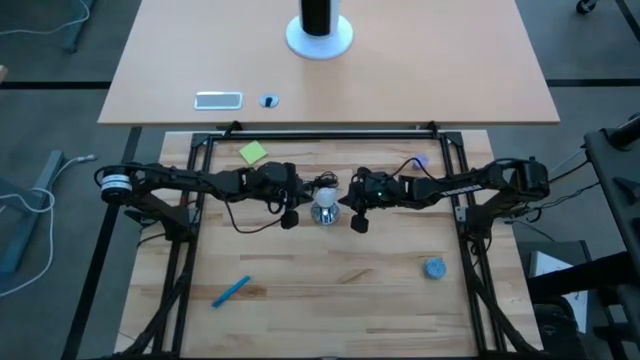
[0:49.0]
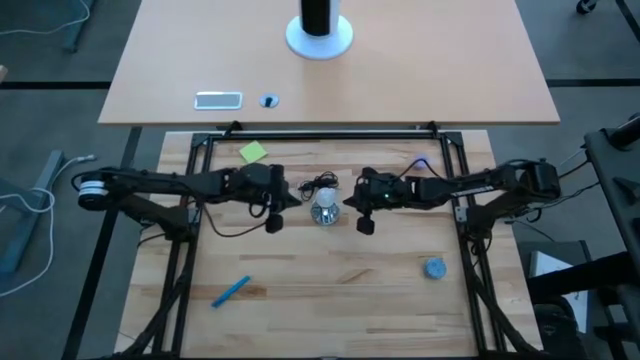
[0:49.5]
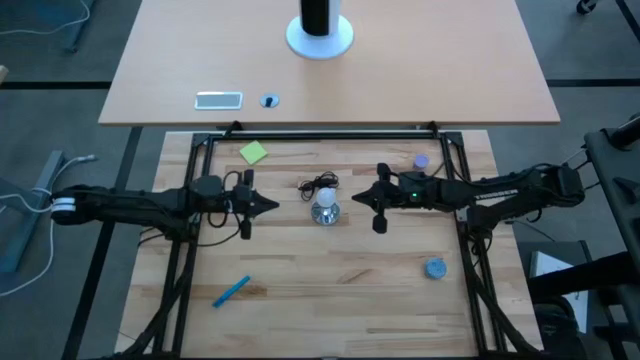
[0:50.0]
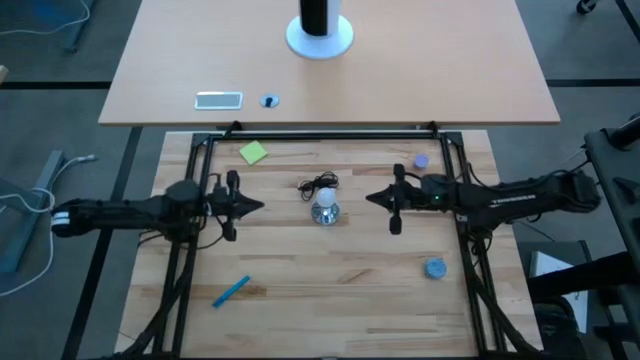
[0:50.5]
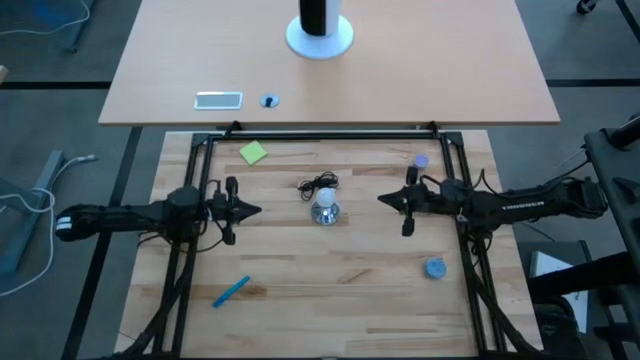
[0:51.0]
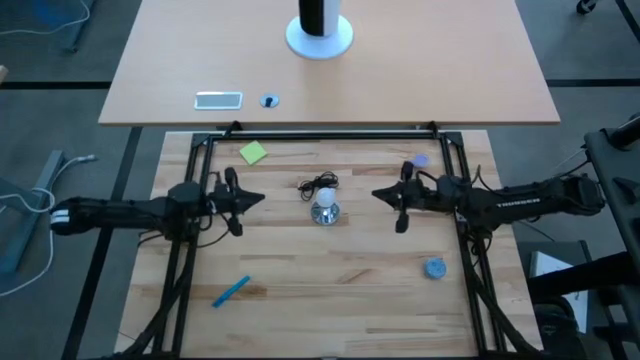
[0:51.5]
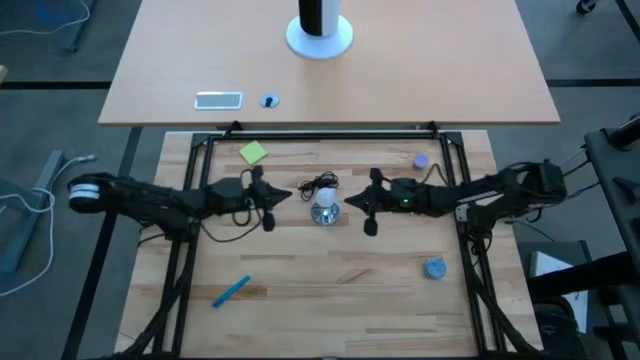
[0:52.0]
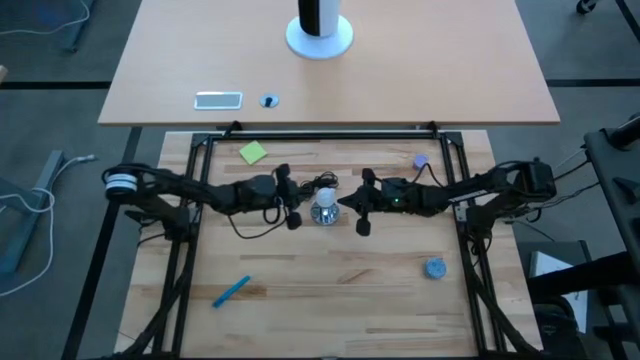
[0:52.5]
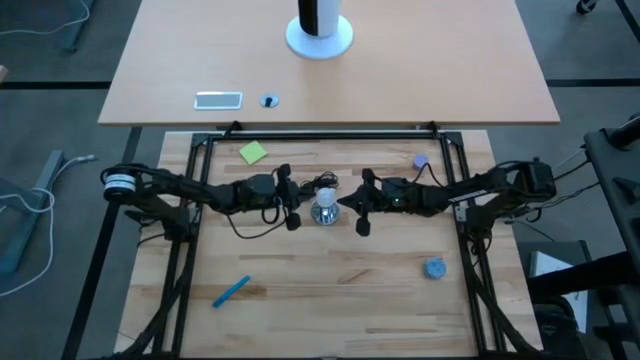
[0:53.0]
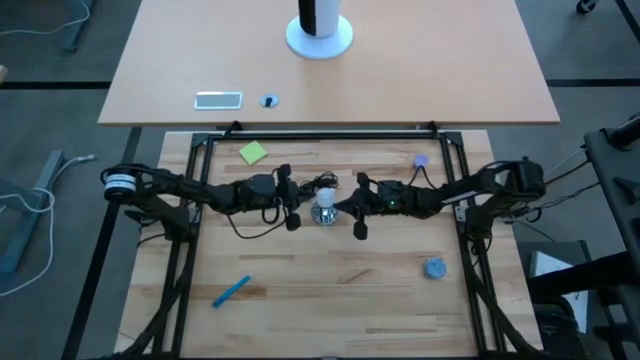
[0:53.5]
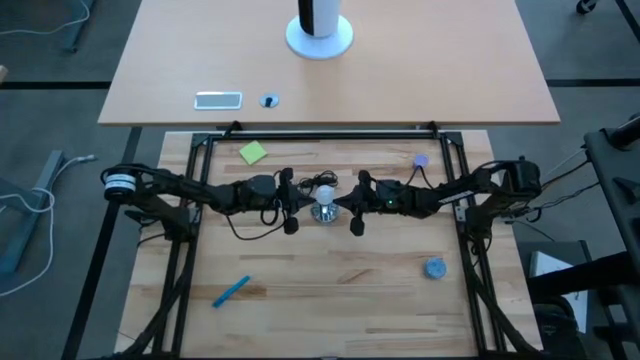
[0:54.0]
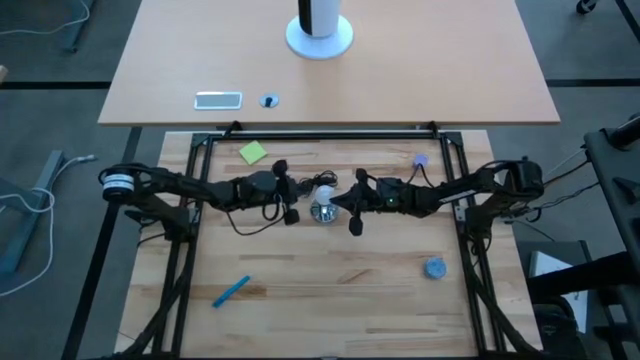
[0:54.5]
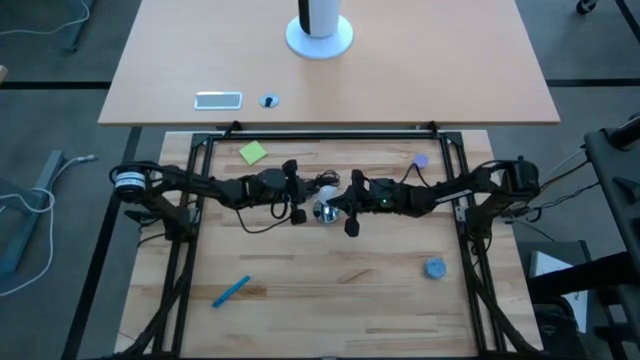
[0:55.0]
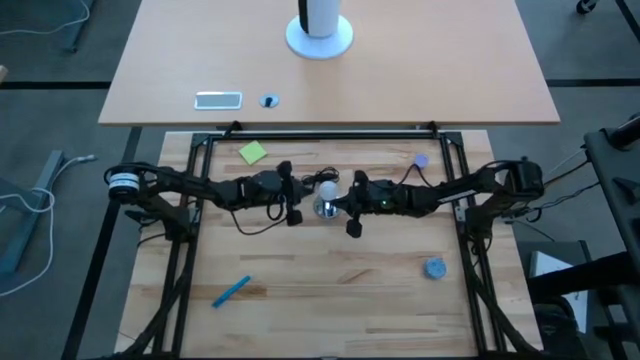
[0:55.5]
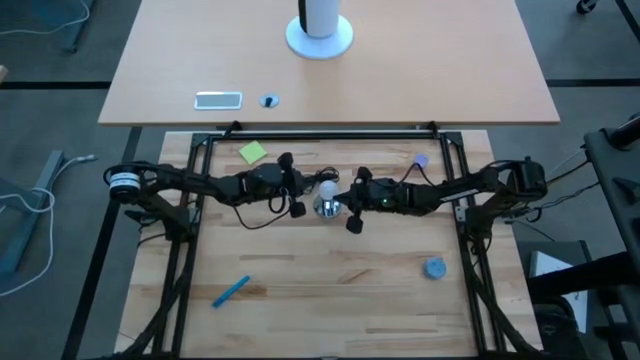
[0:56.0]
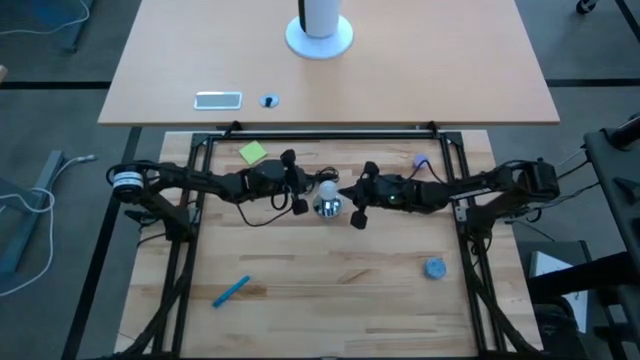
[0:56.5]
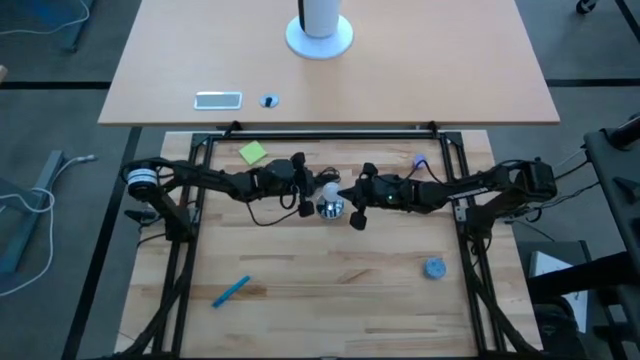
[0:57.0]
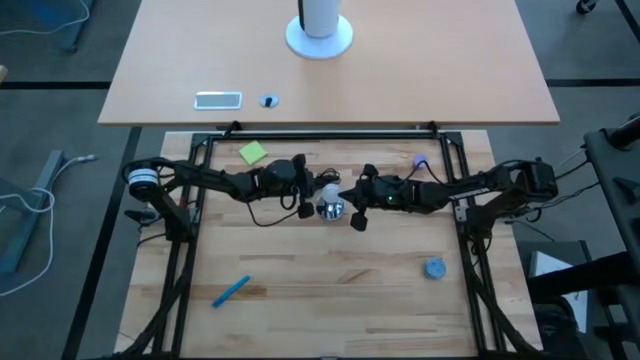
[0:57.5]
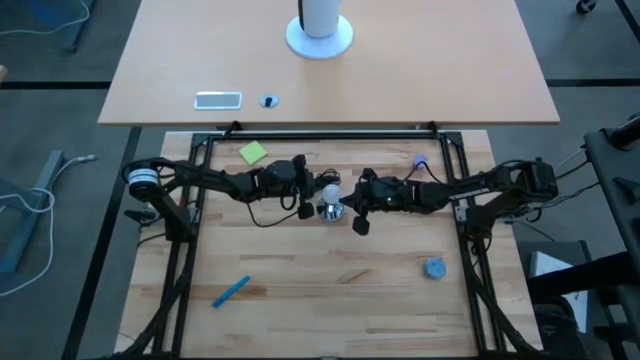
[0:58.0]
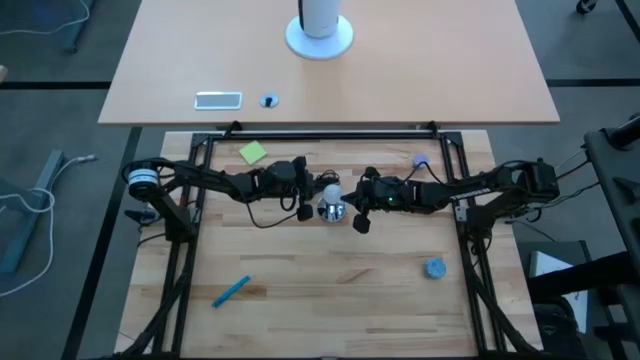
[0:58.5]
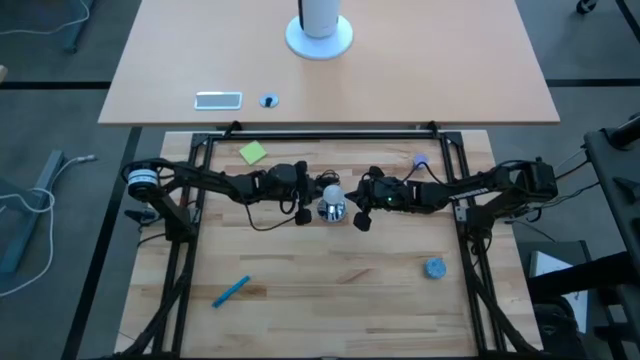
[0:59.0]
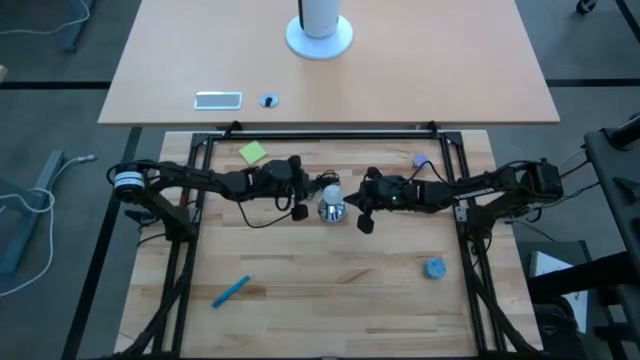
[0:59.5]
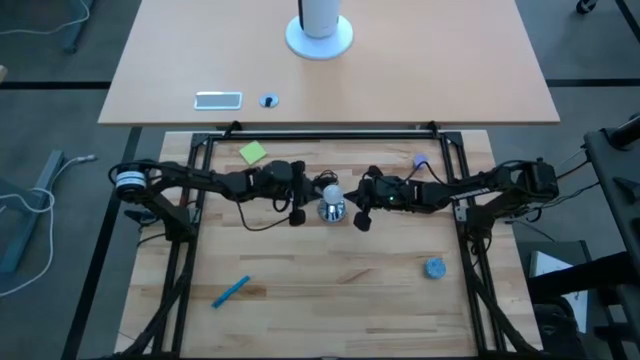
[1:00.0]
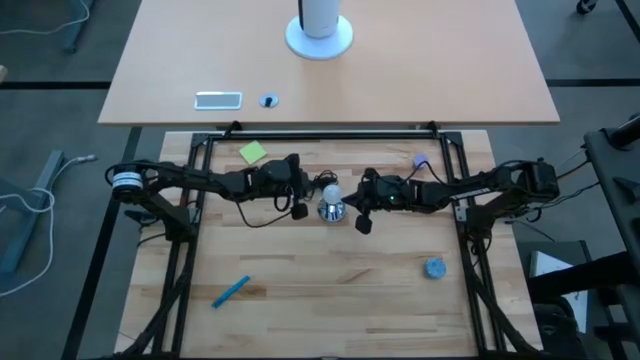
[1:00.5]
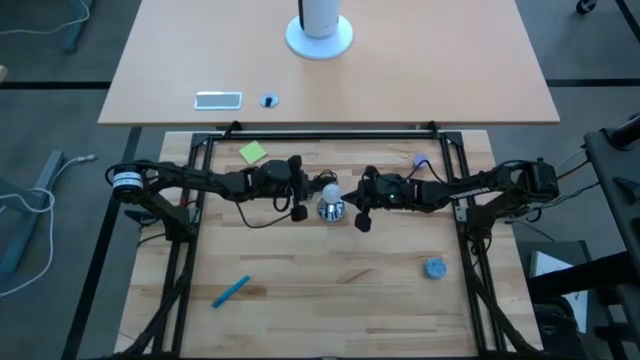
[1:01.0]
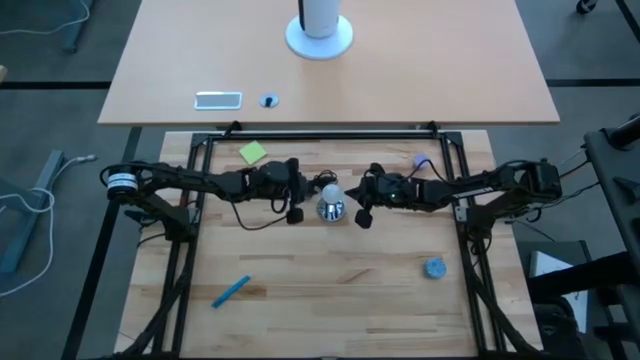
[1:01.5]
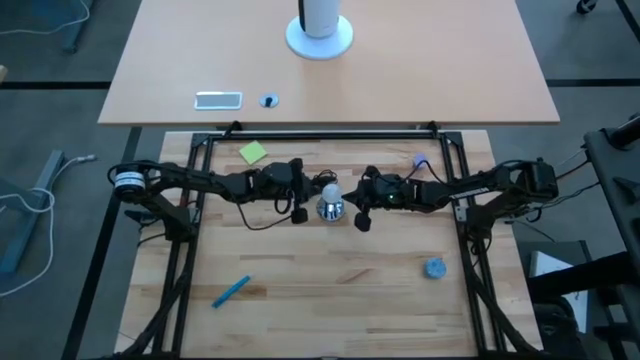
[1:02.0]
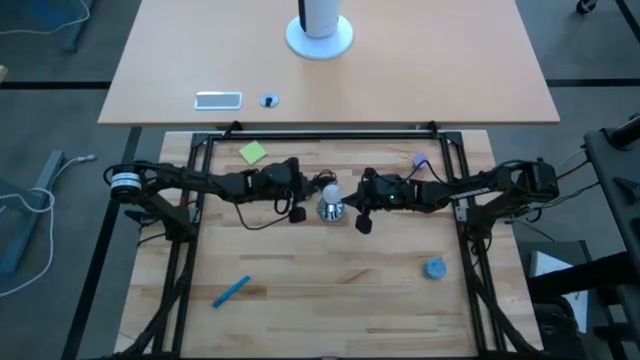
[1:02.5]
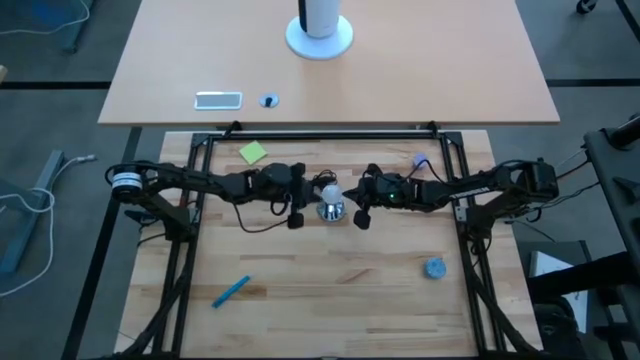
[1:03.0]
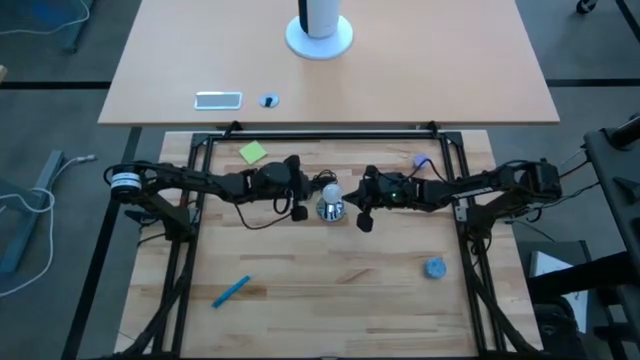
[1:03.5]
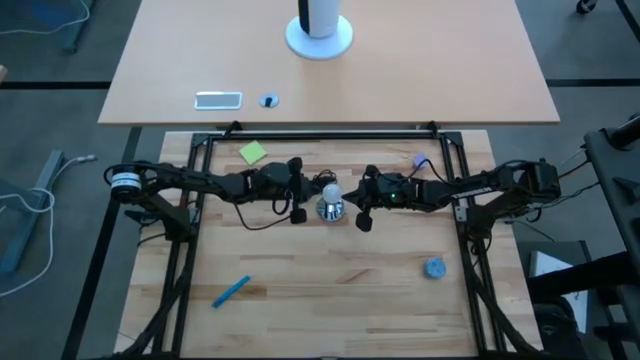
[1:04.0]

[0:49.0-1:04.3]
Task: Screw lightbulb
Remove the lightbulb from the lamp

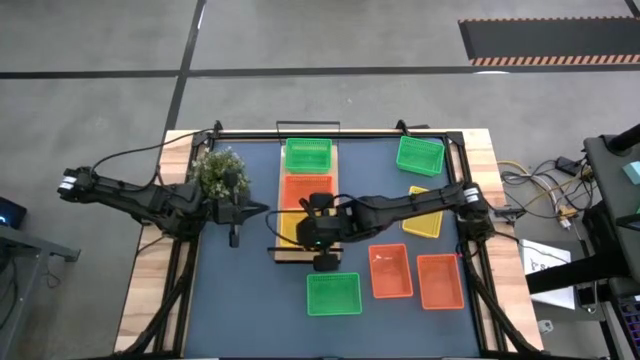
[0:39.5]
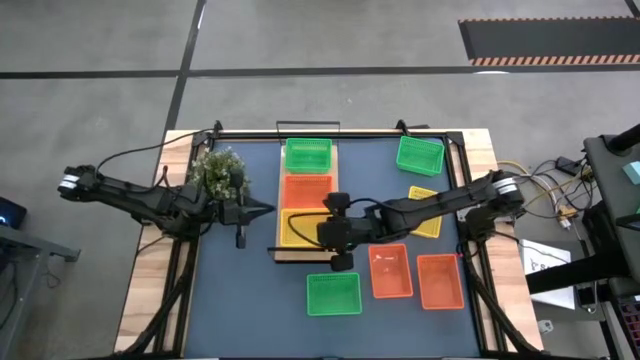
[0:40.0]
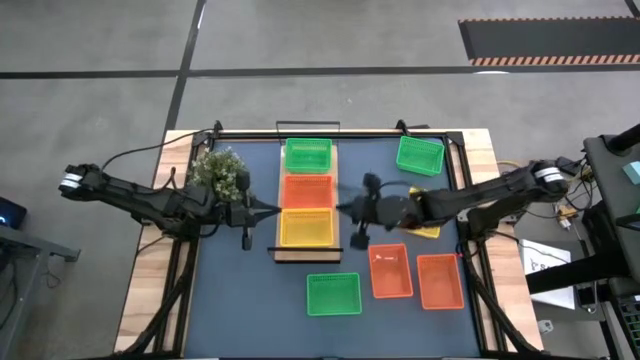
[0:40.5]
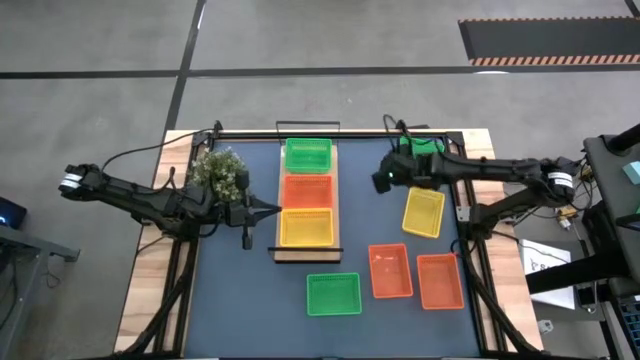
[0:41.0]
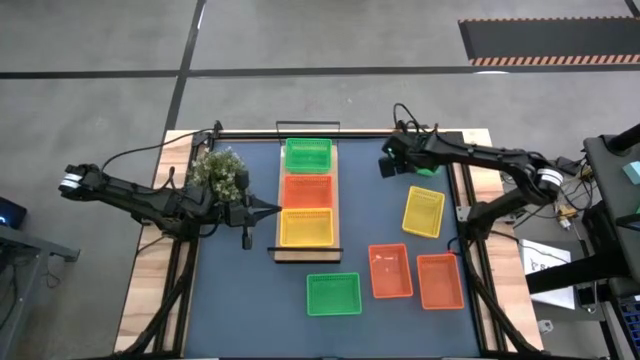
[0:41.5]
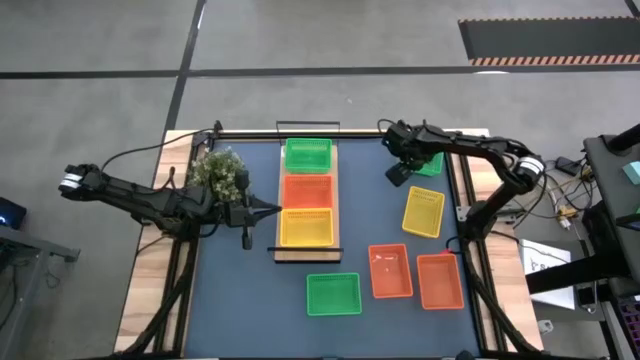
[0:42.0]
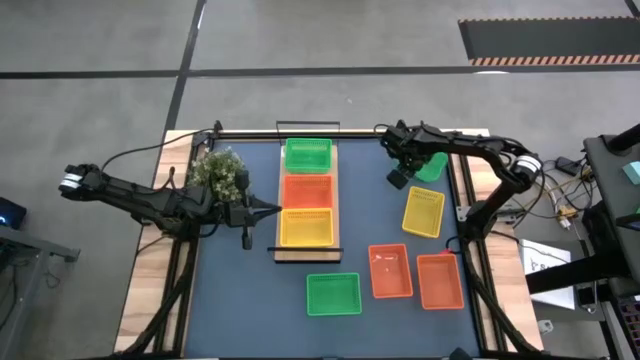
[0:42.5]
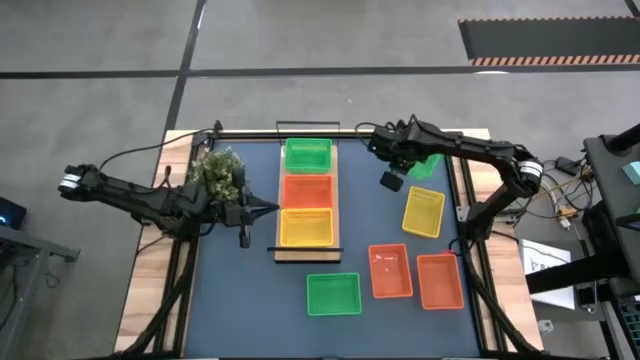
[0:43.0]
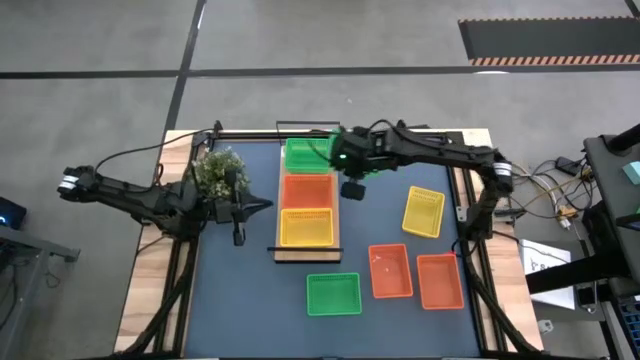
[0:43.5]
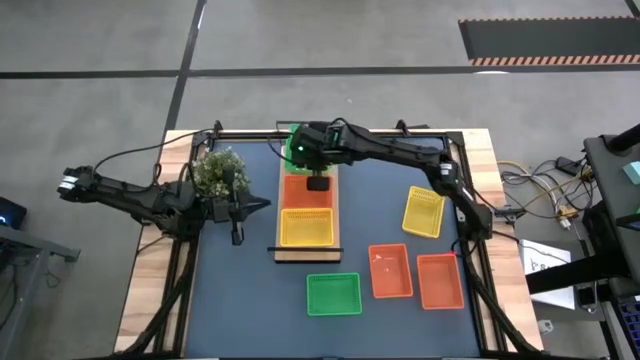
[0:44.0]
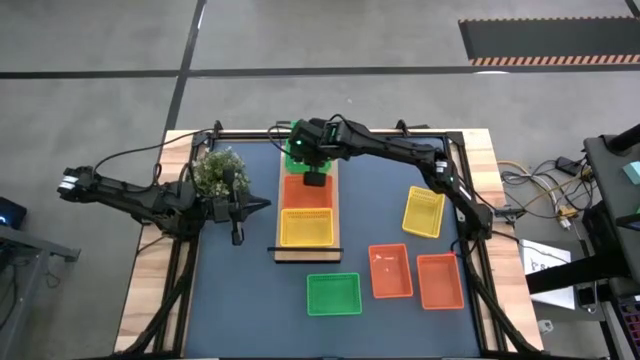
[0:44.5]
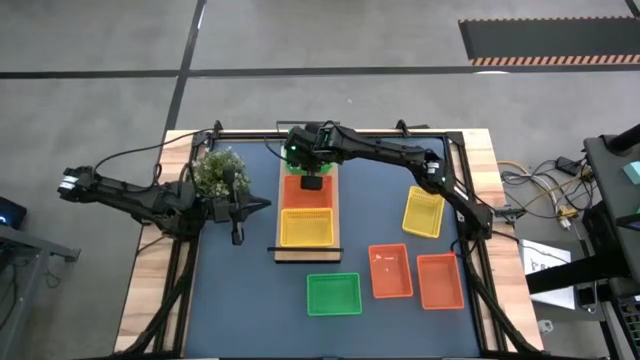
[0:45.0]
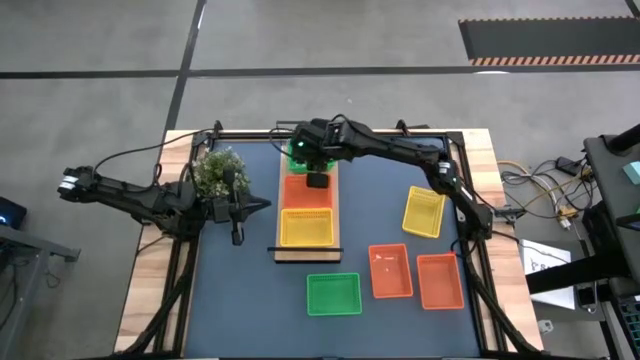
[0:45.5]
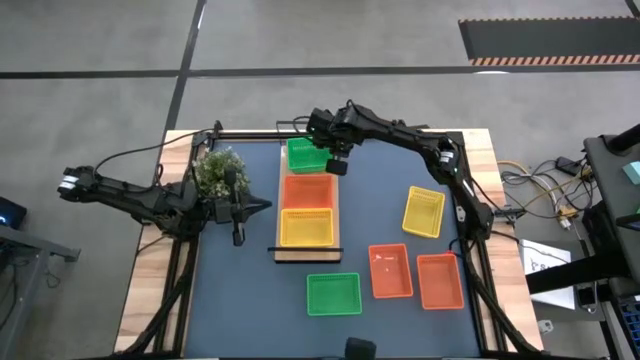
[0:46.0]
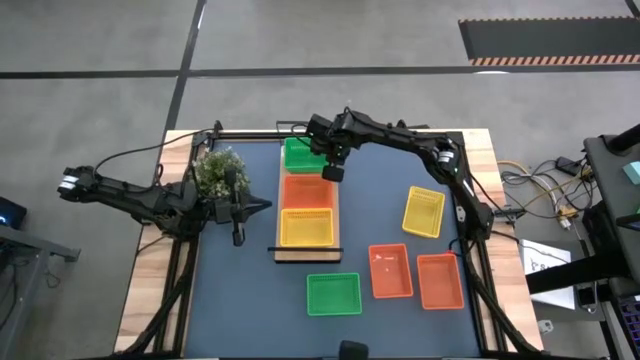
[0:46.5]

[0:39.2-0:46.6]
Task: Stack baskets on shelf by color
Stack the top green bin on the green bin on the shelf
